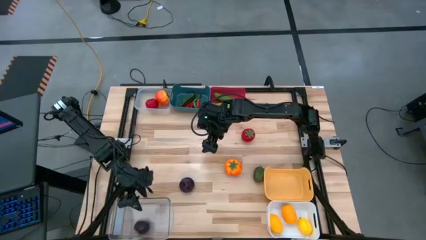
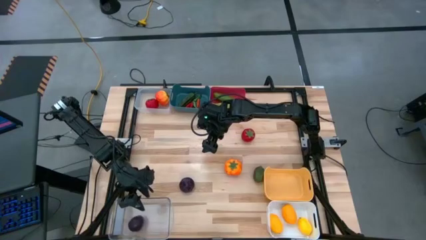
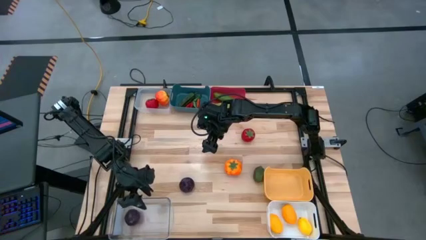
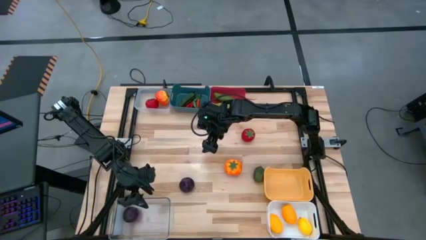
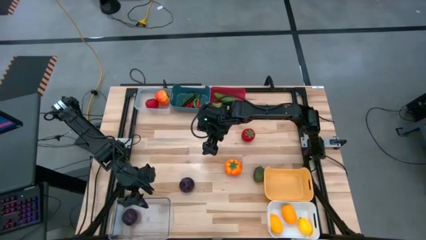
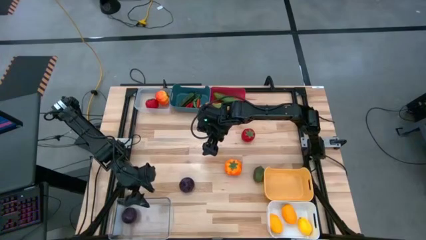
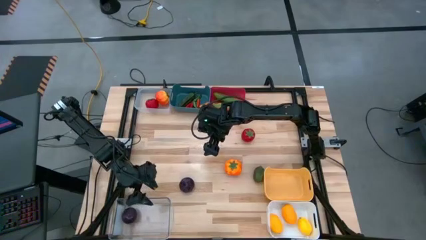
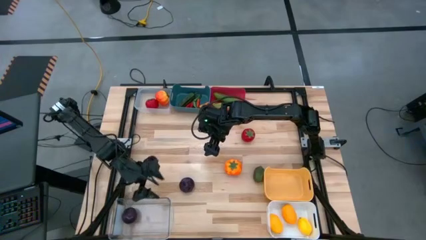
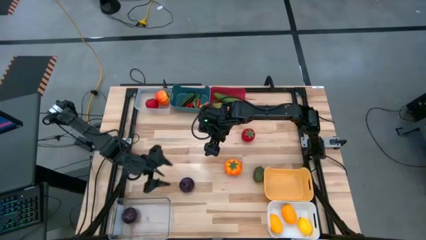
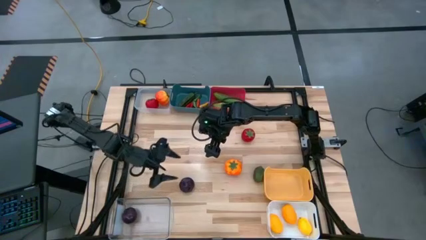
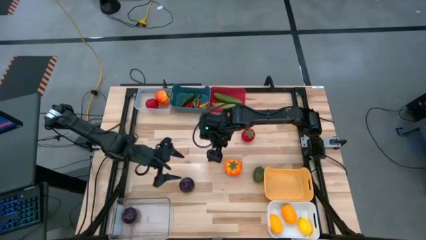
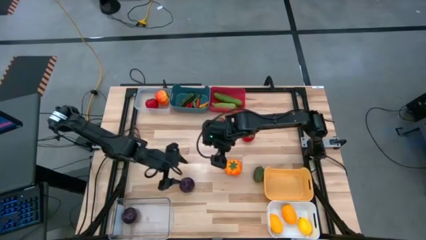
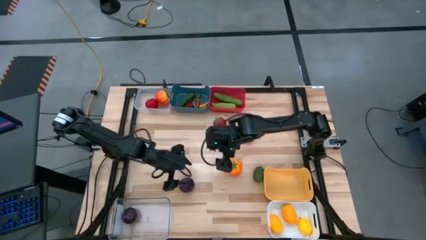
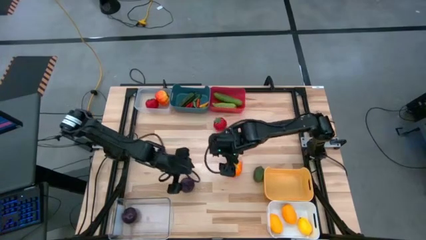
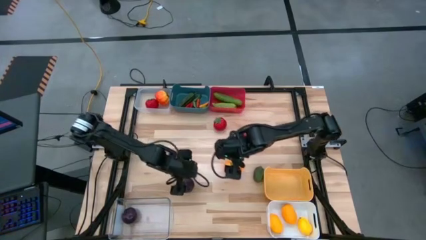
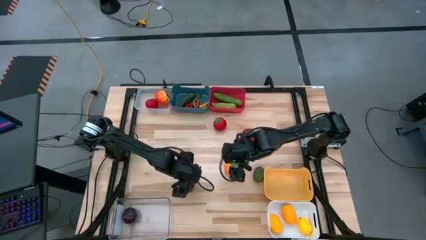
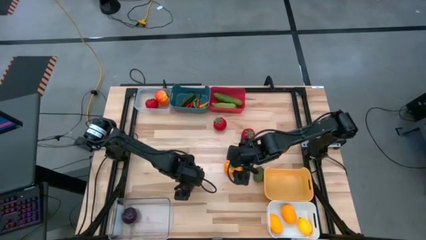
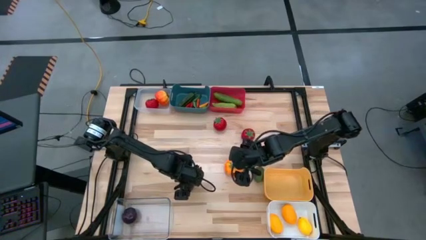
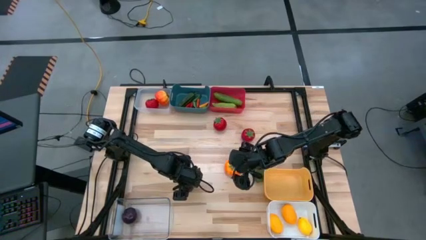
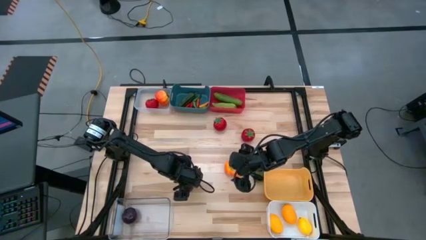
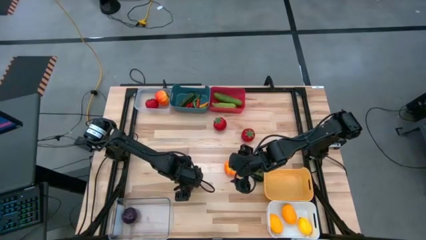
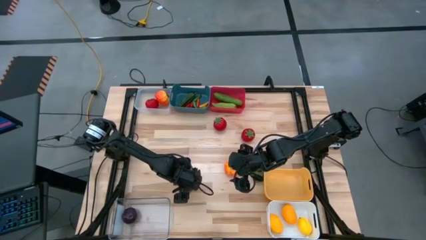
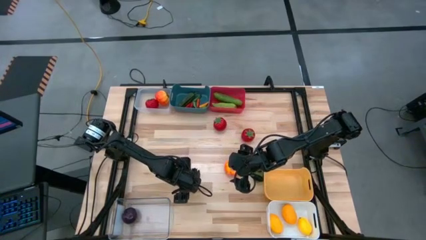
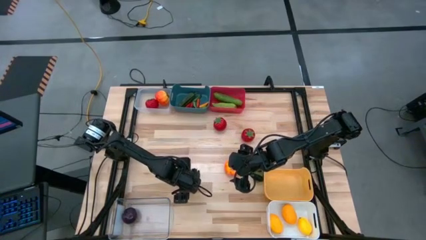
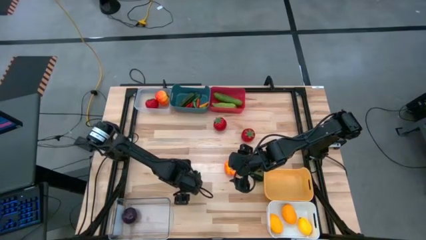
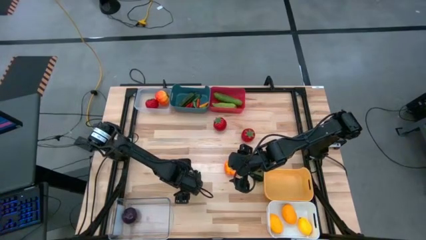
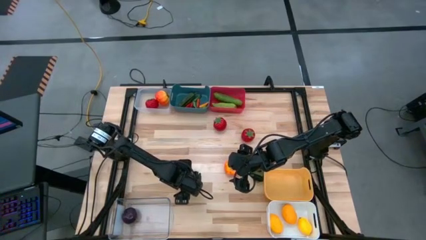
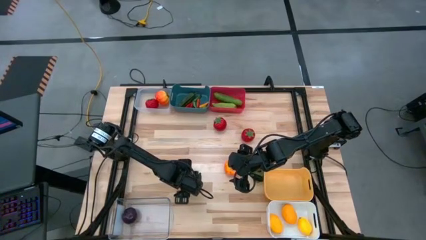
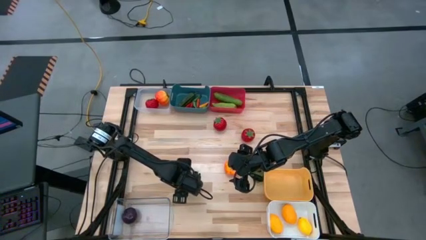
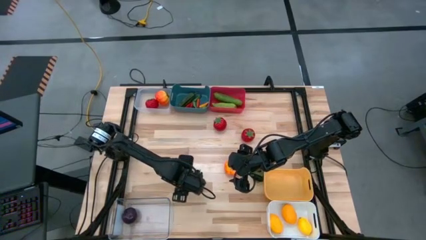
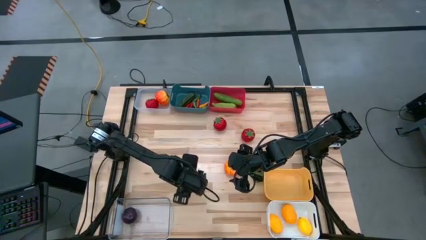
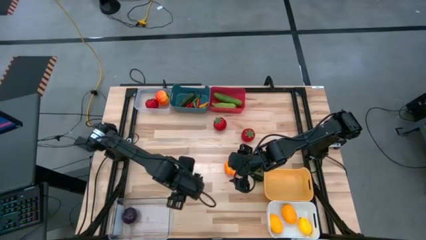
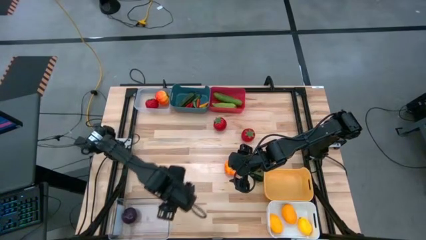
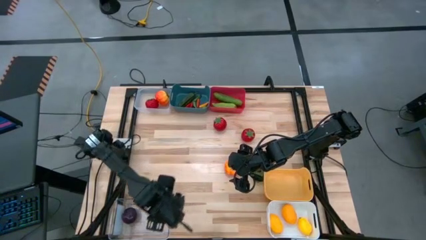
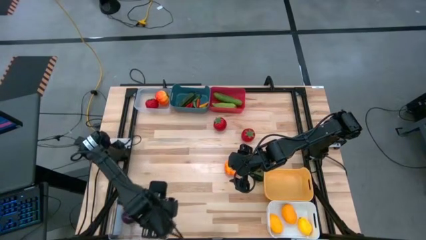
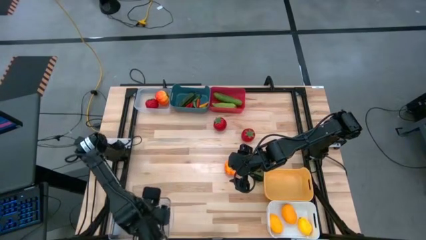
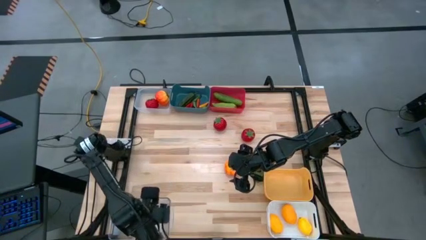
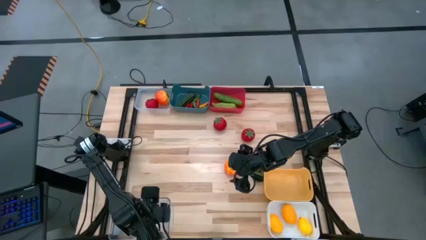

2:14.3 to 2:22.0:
Task: Sort produce into baskets
Put the plum into the bottom transparent bin

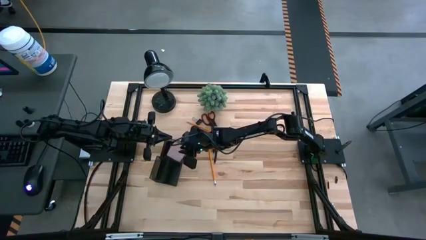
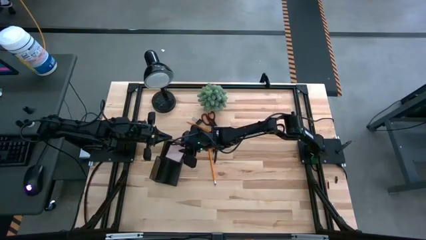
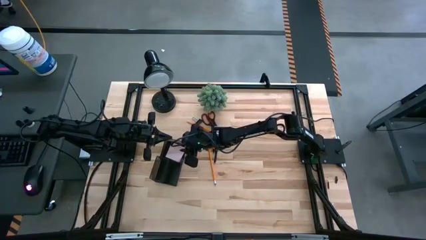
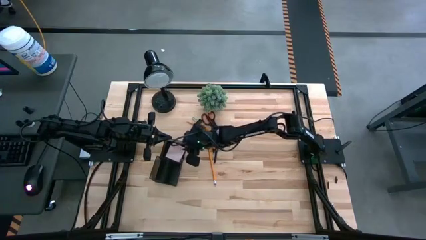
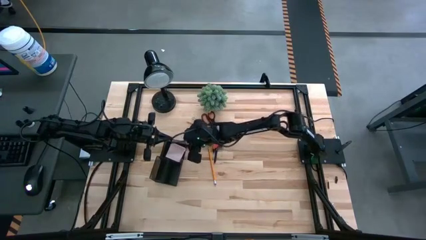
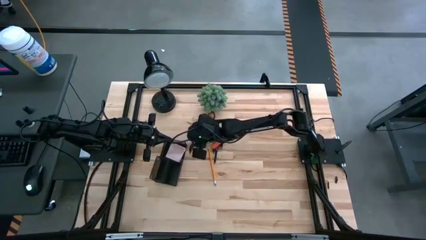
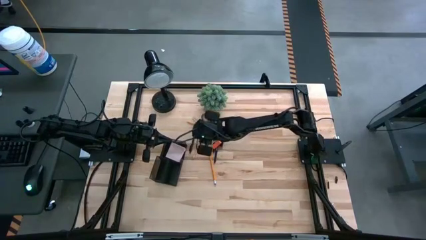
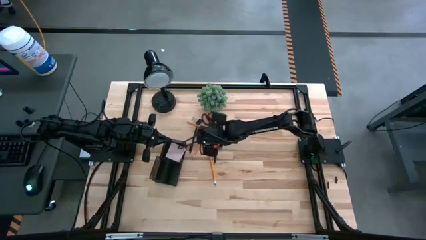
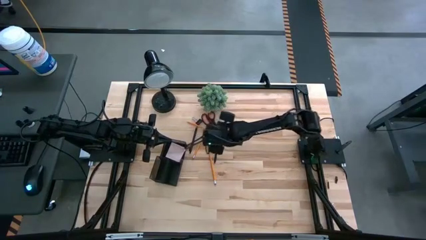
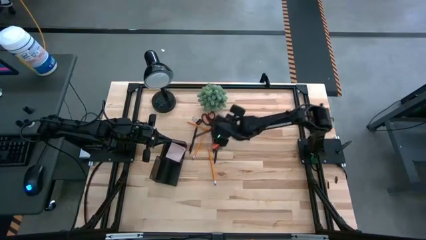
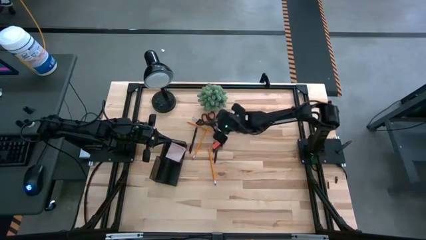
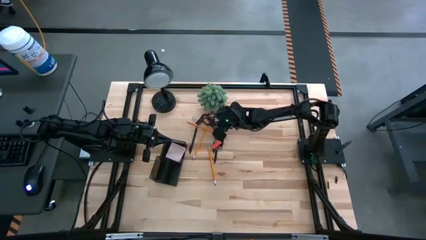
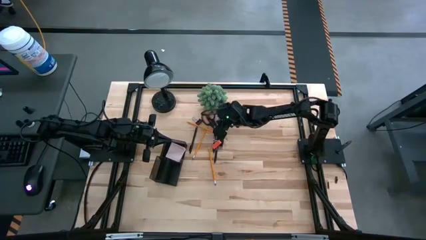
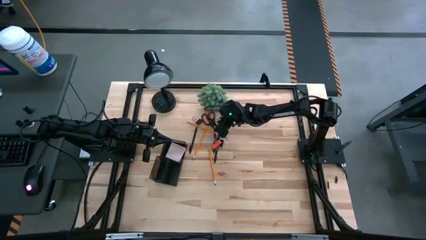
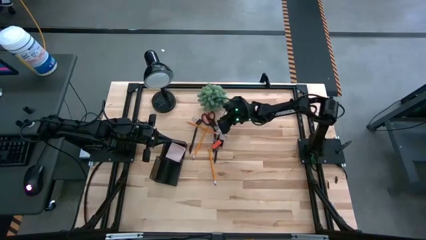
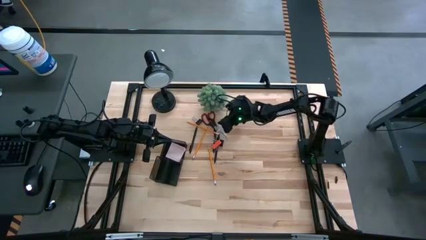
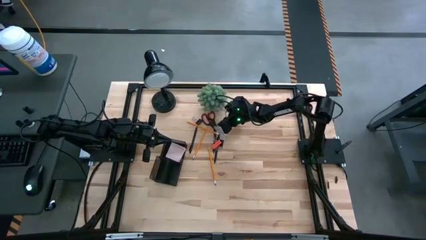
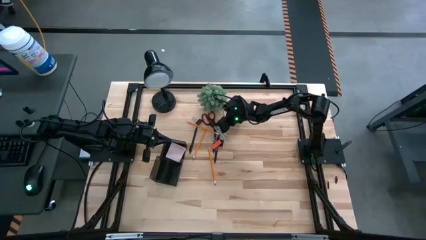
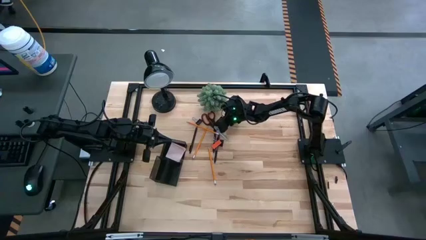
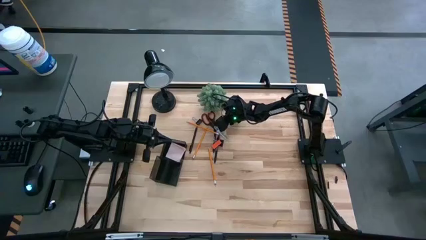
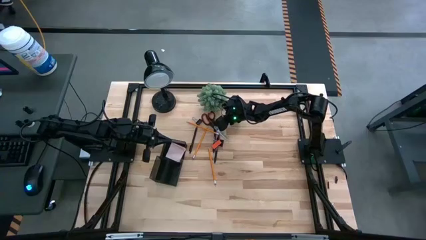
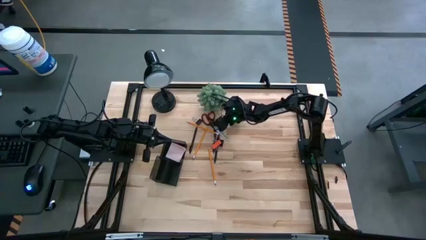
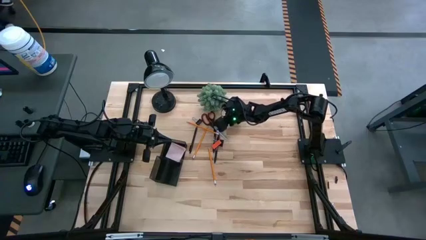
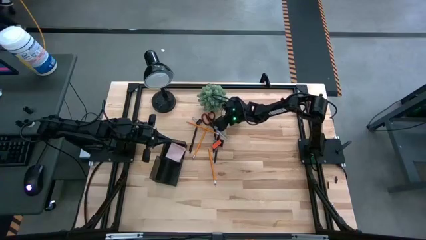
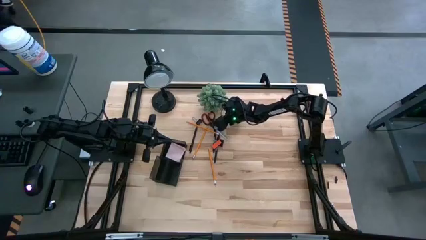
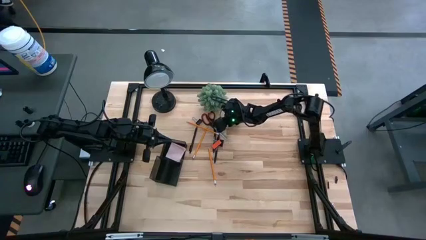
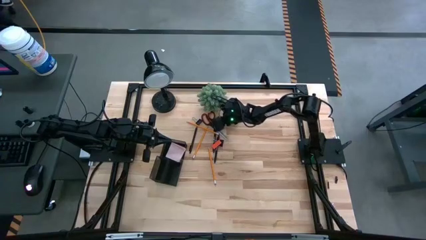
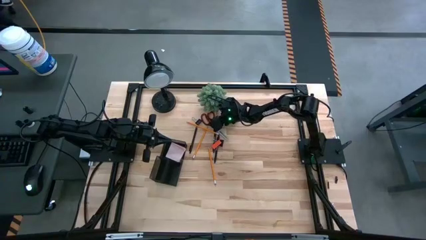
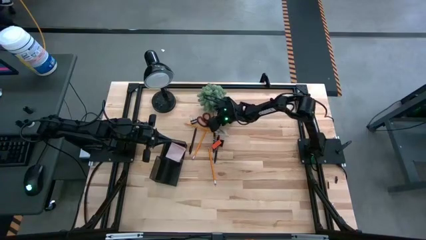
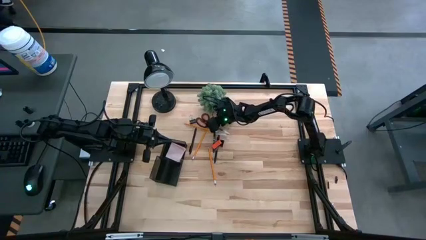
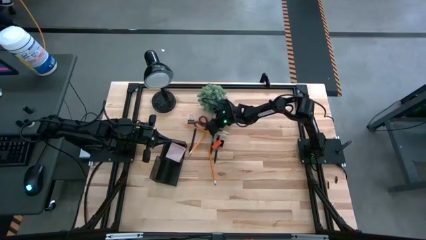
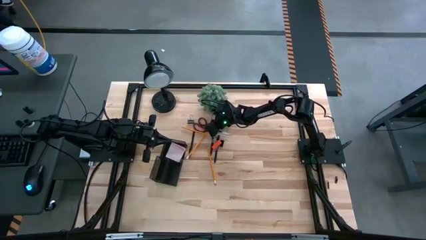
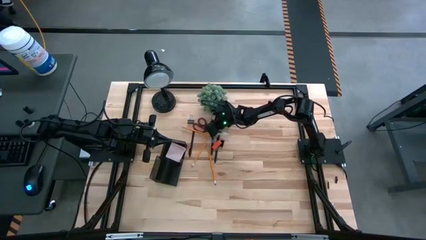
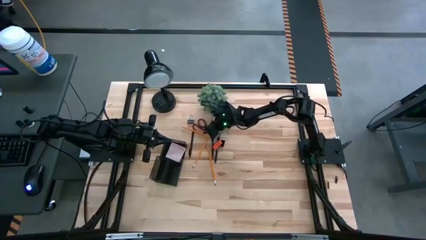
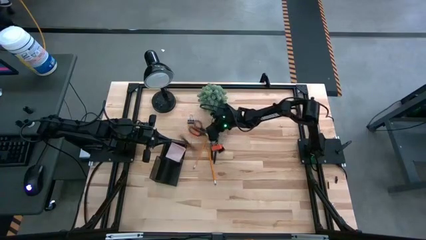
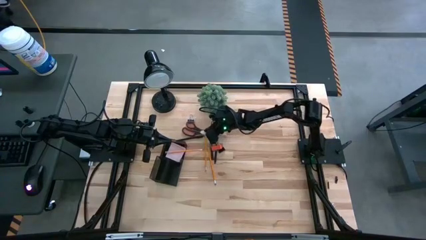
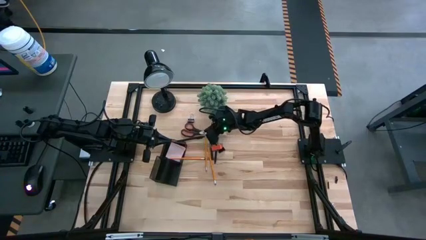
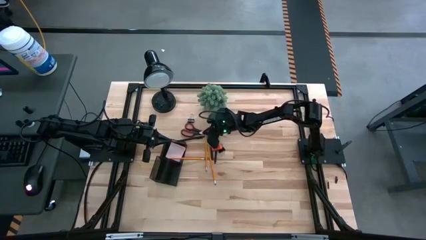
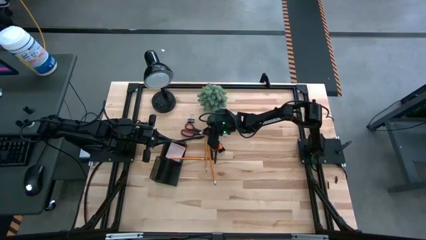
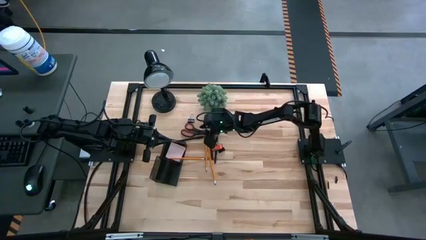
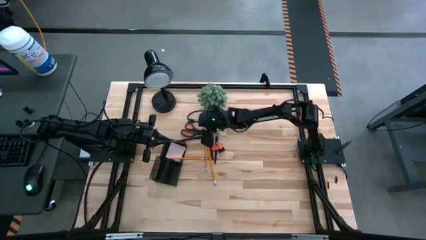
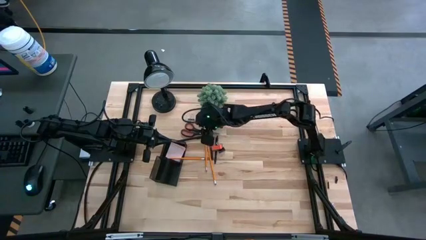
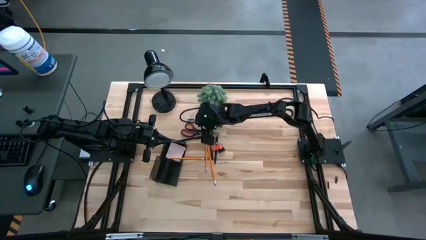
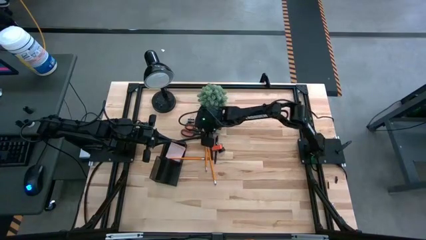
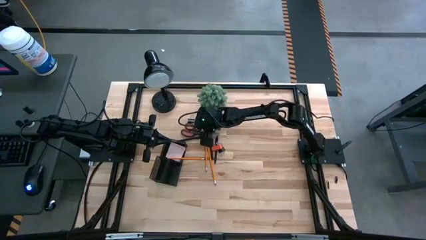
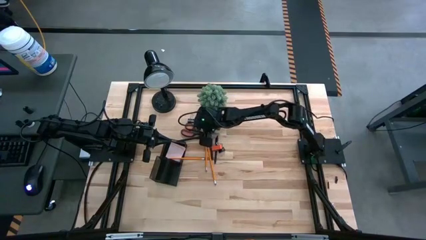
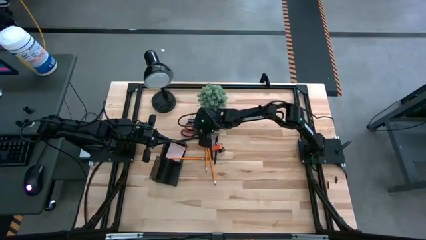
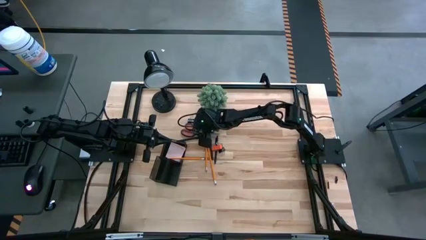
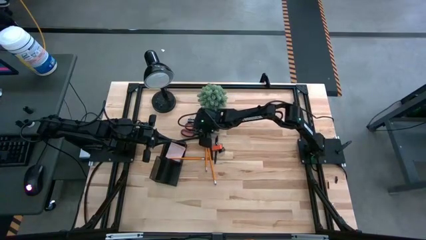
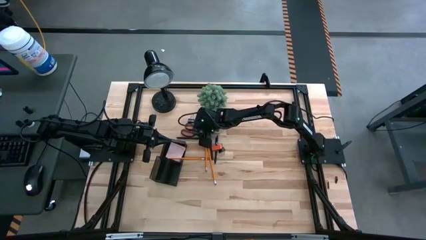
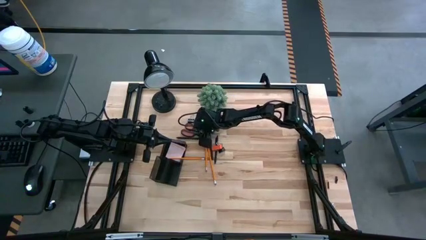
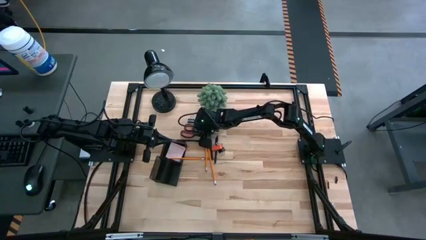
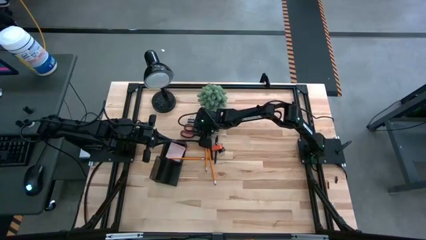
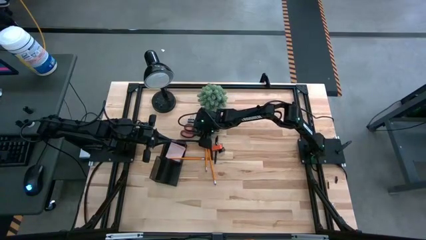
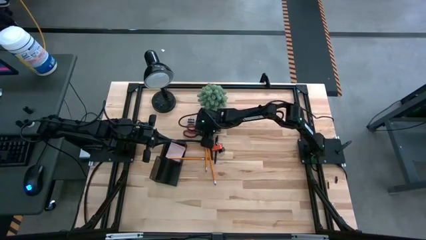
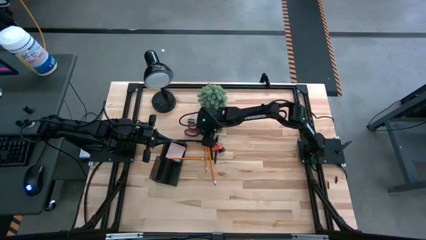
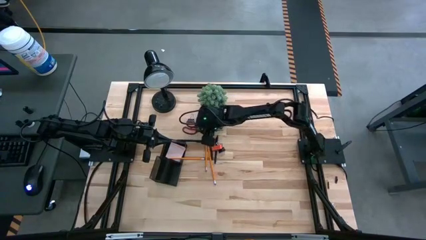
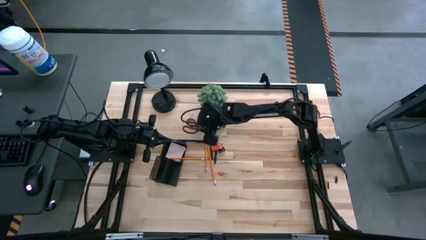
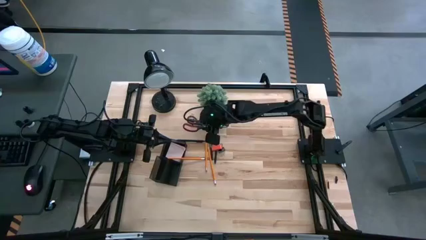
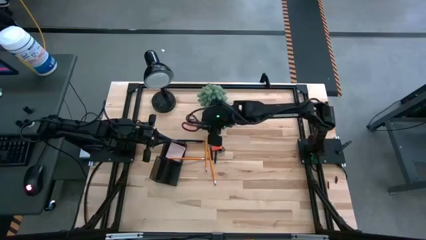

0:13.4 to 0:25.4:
Task: Pick and place office supplies into organizer
Put the black scissors into the desk organizer
